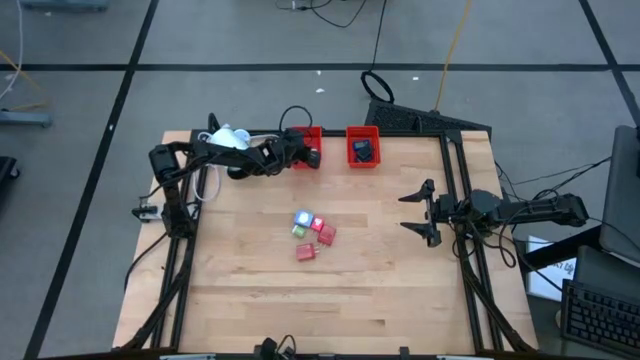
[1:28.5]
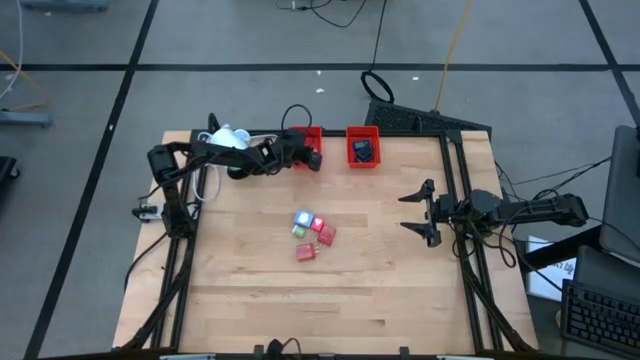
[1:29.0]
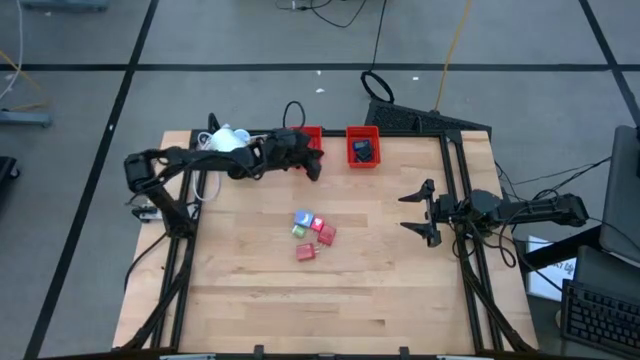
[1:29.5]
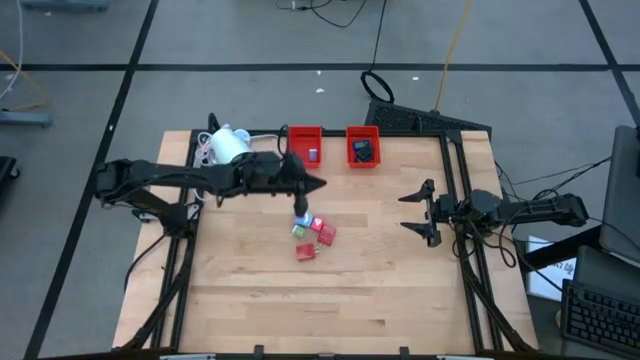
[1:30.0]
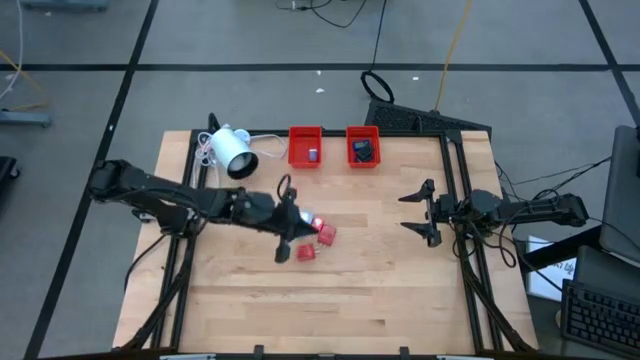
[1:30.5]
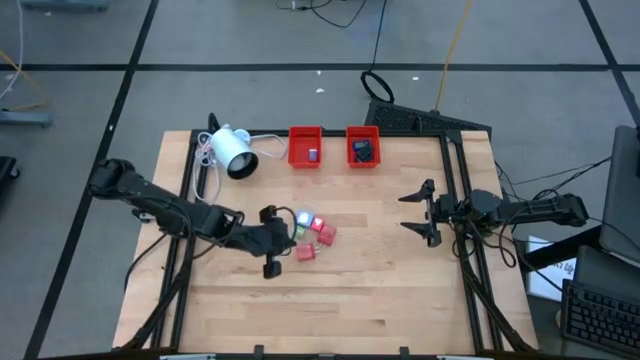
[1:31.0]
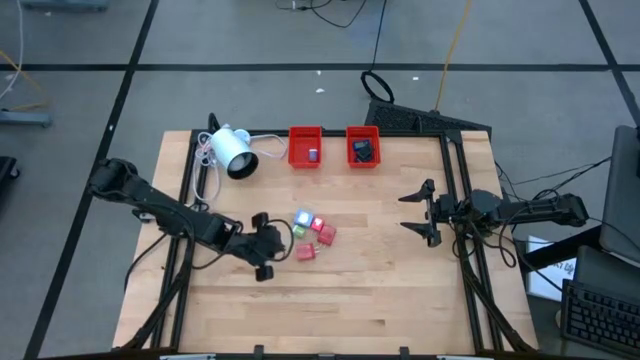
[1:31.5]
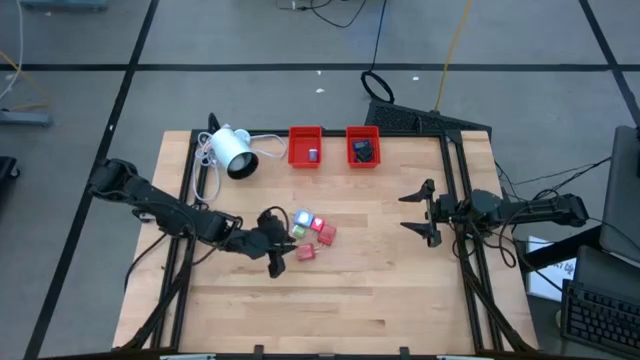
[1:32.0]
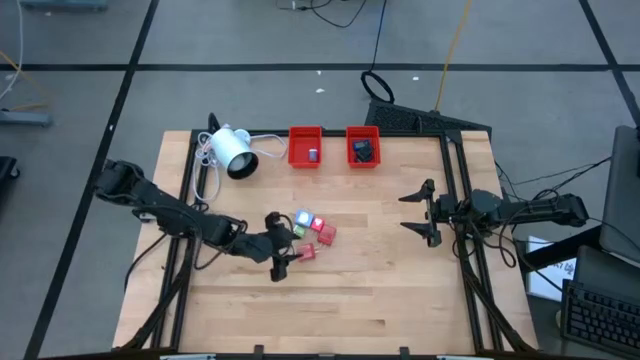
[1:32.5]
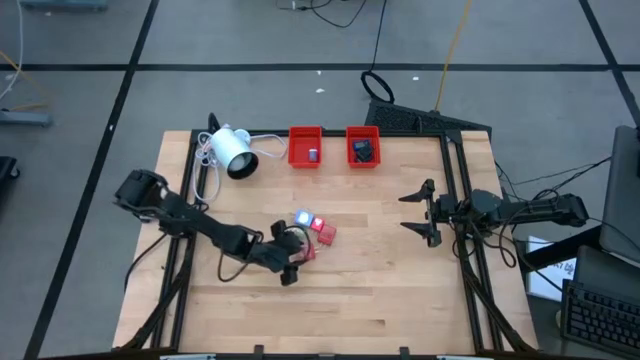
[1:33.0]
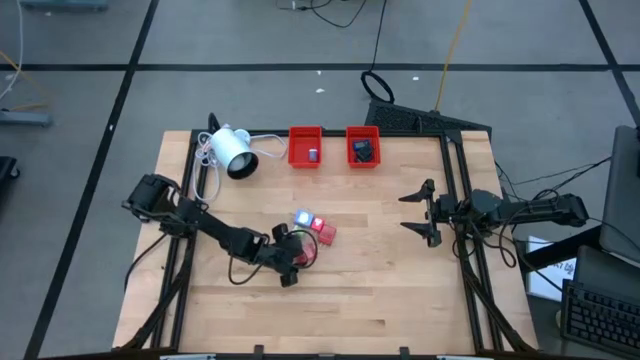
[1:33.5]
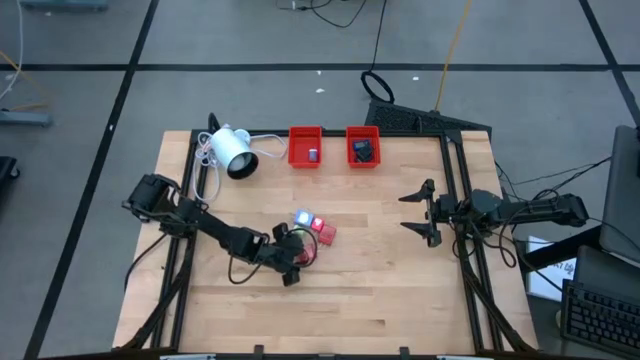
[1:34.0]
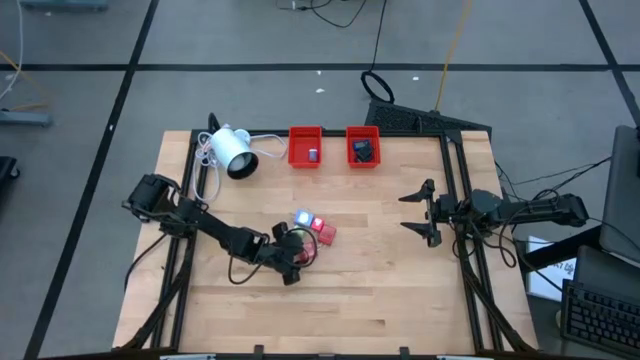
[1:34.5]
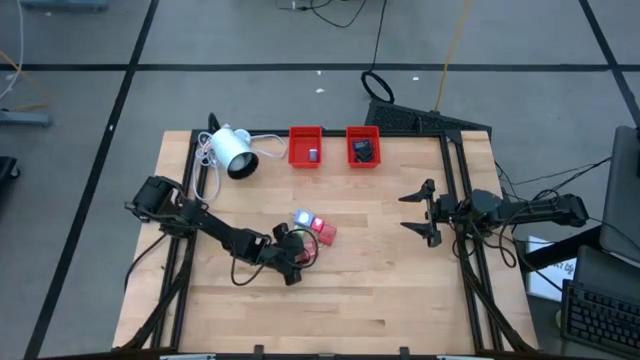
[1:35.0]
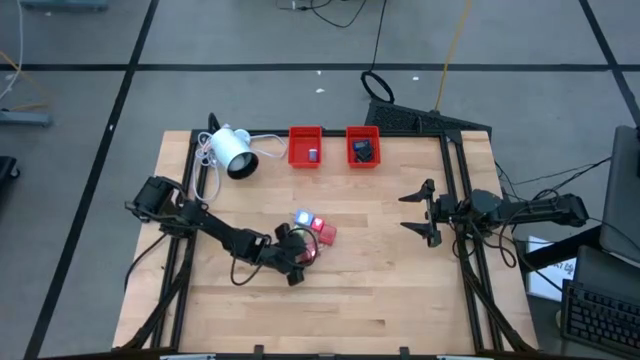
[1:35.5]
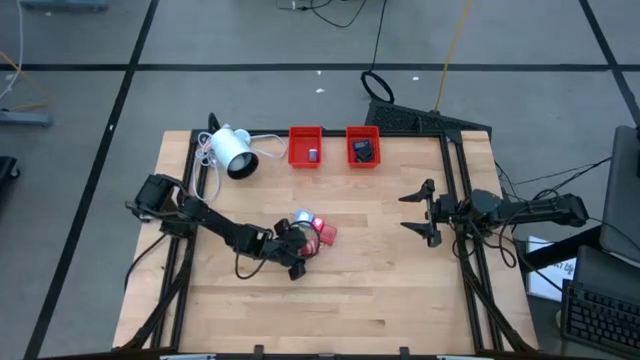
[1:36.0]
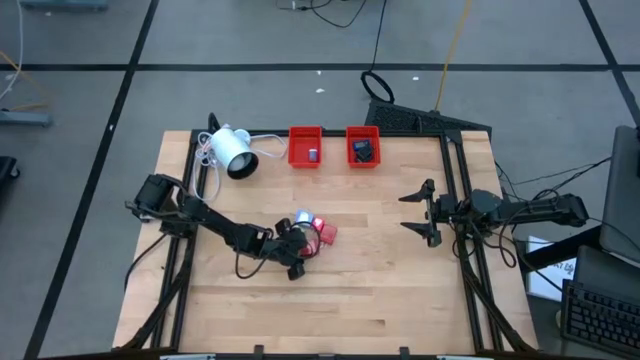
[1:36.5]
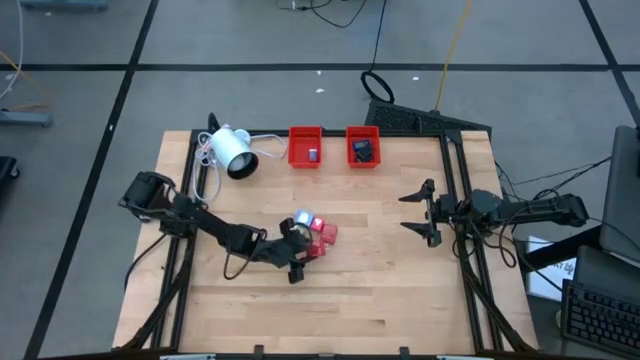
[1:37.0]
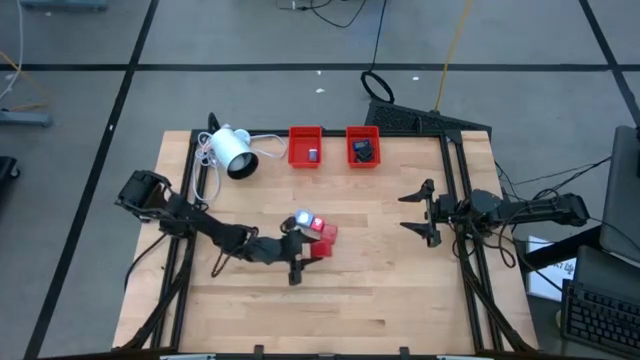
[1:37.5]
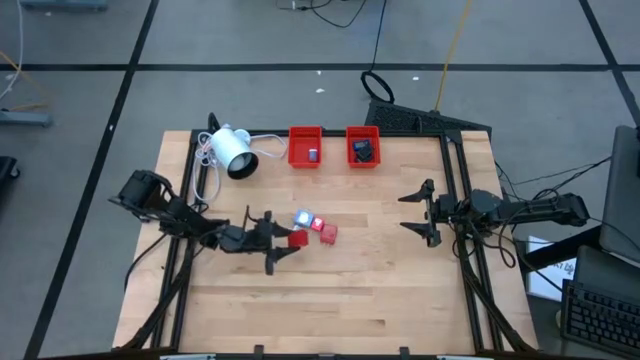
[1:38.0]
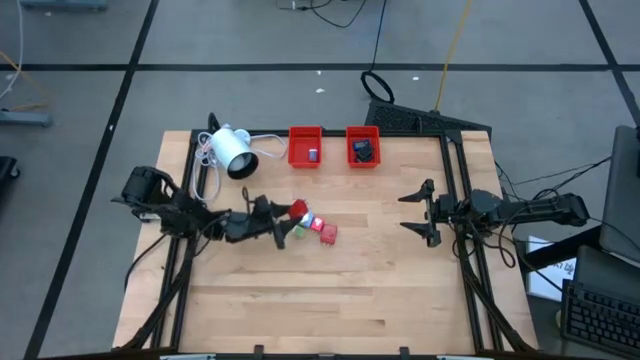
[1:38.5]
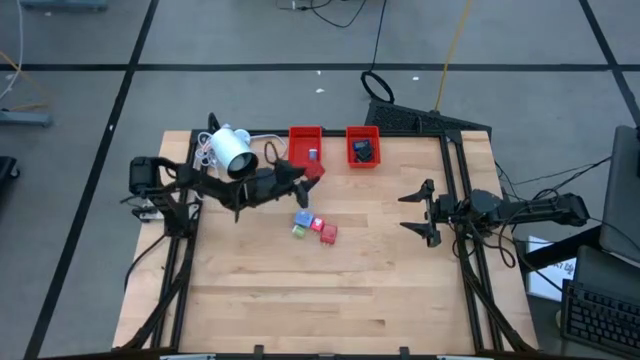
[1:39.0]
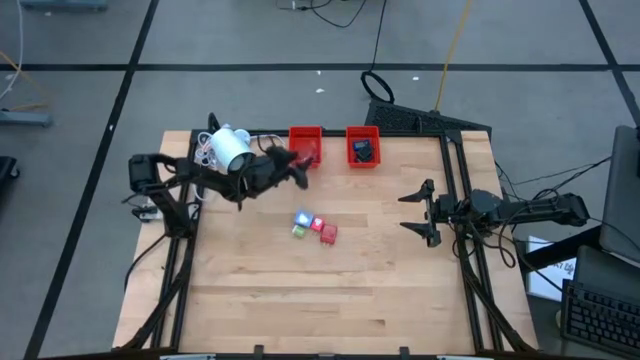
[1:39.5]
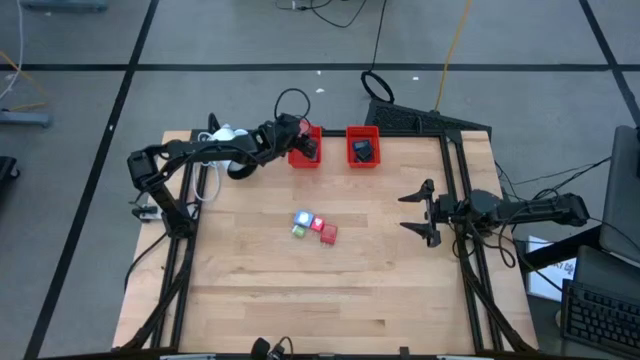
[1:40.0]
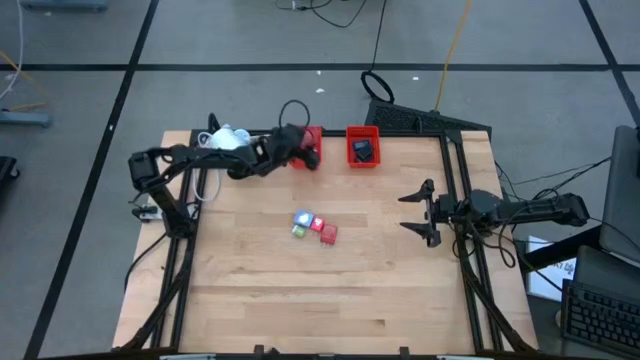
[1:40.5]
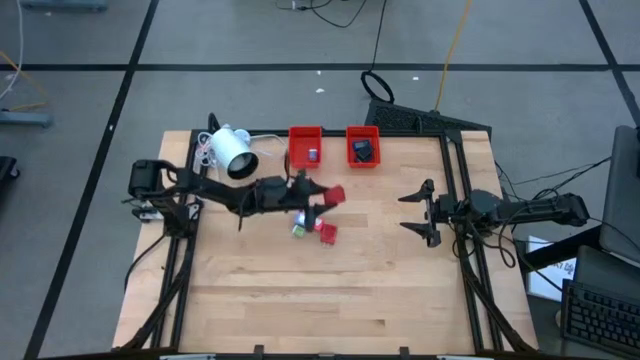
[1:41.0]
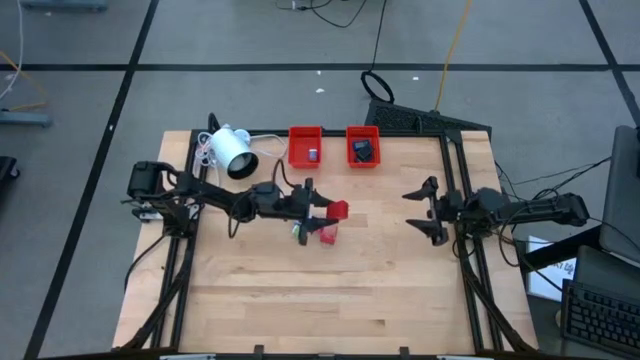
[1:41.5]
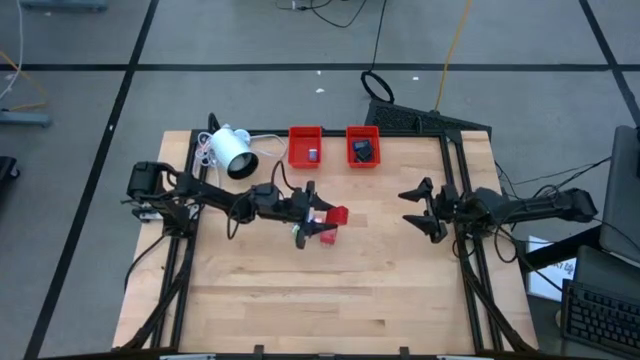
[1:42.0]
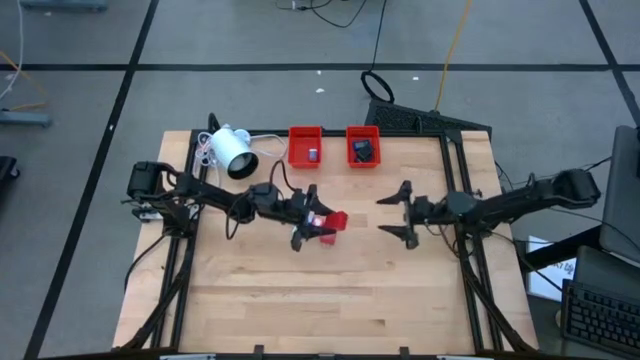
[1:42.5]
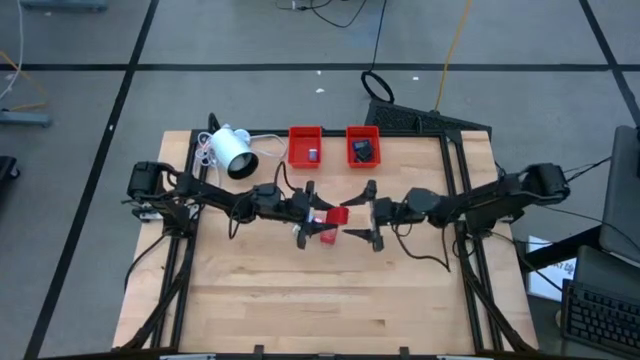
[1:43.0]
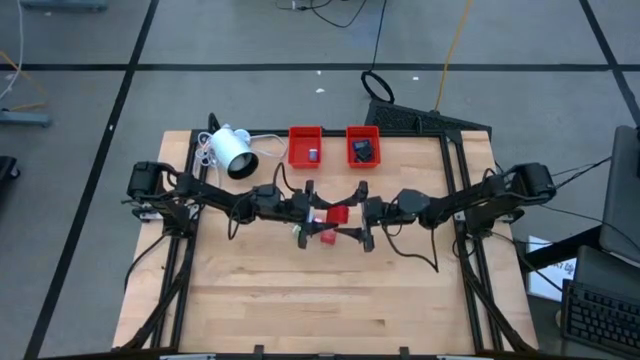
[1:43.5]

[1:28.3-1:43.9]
Task: Pick & Place Office items
Put the bottom red charger adapter into the left red bin

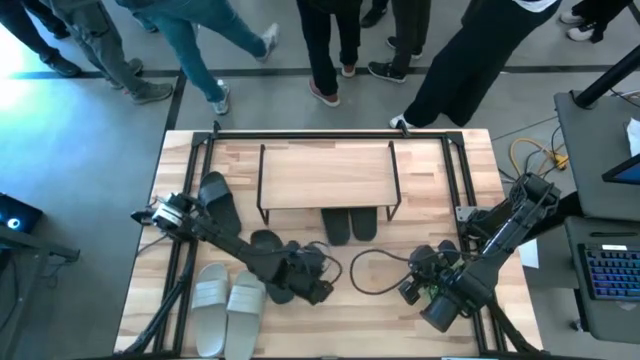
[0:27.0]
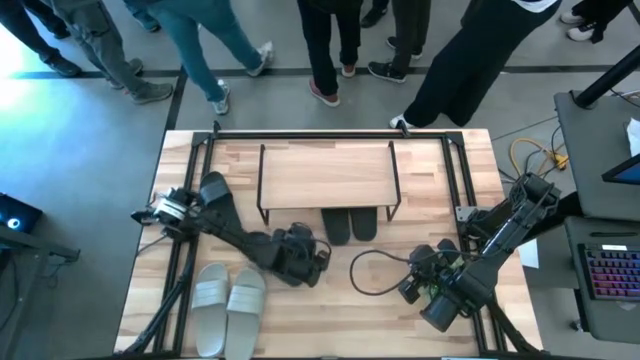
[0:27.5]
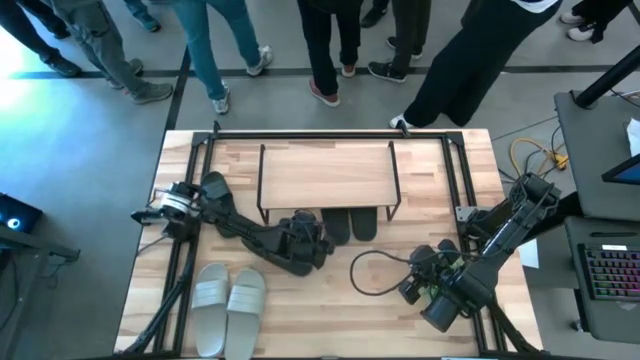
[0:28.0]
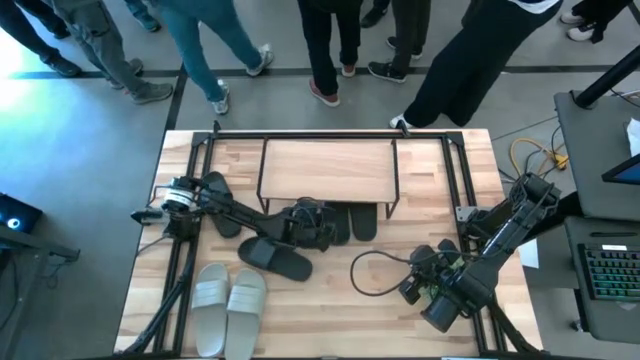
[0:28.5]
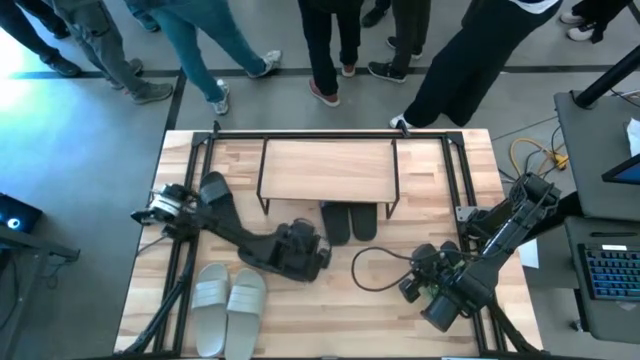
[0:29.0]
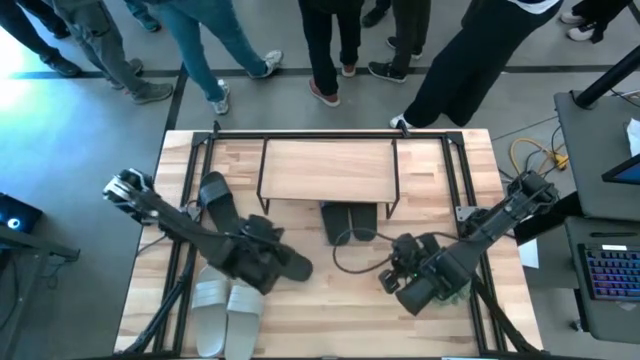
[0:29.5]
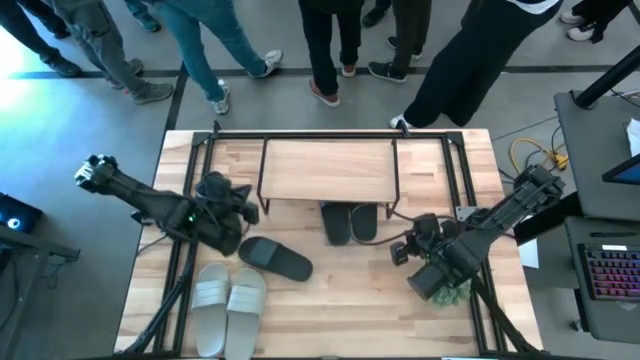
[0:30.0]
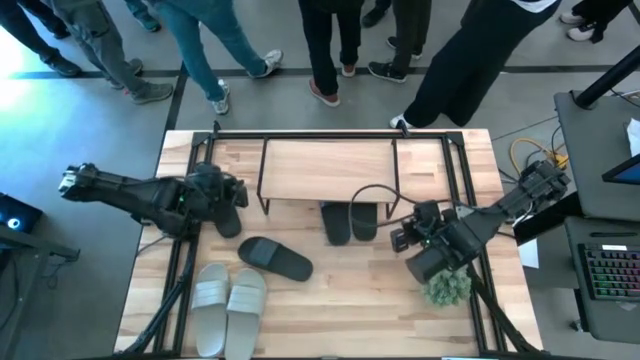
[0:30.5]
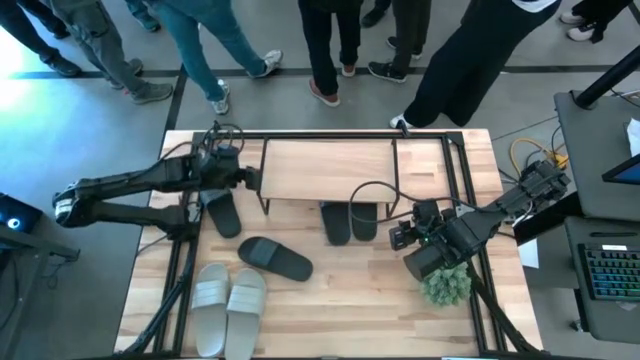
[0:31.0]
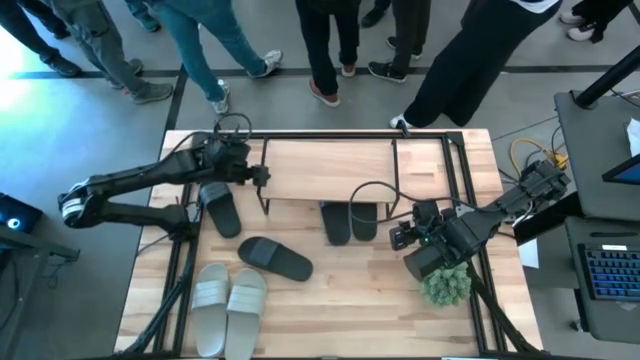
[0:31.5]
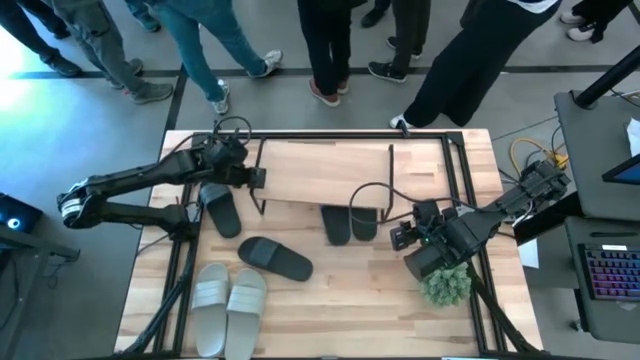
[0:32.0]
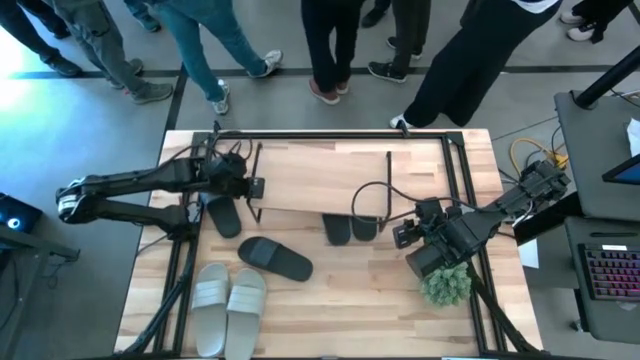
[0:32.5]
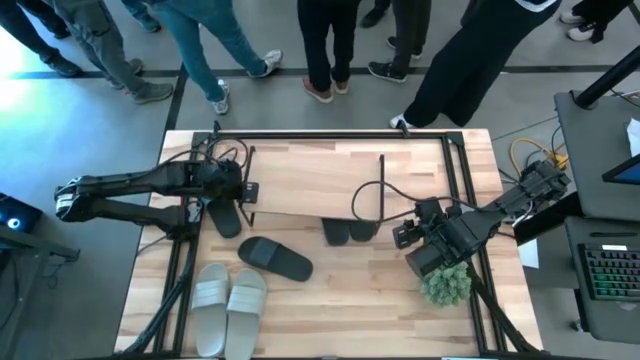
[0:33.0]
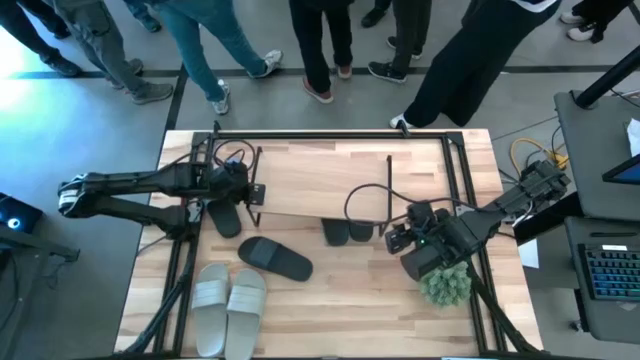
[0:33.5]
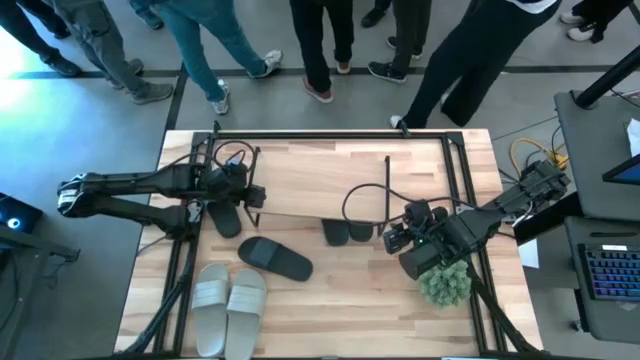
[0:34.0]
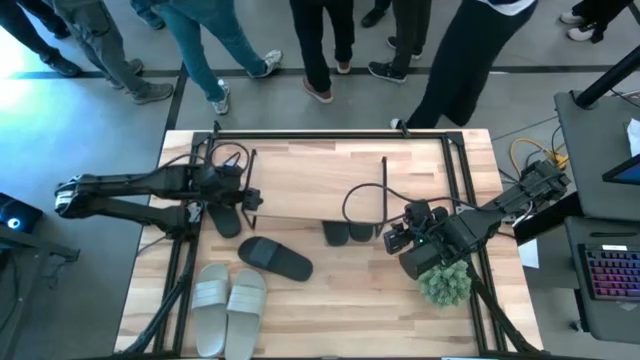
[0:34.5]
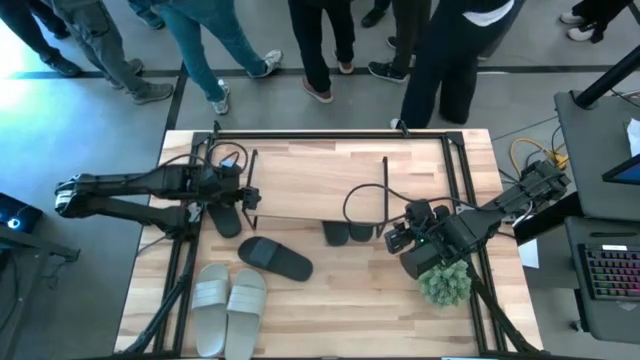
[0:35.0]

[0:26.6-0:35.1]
Task: Pick and place slides into the shelf
Adjust the shelf
